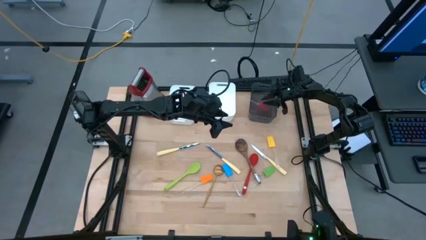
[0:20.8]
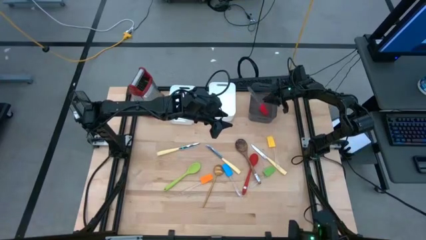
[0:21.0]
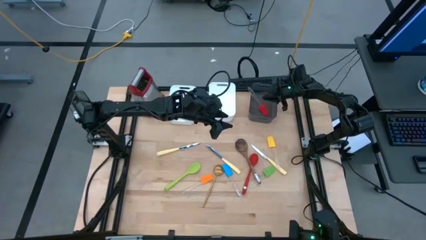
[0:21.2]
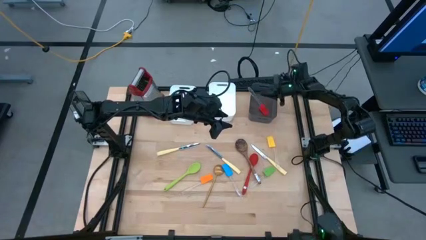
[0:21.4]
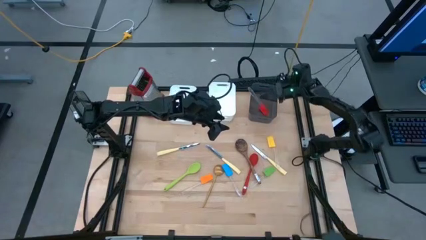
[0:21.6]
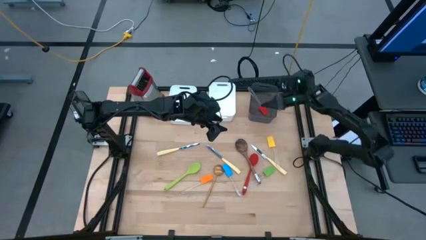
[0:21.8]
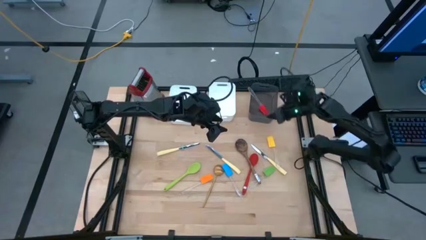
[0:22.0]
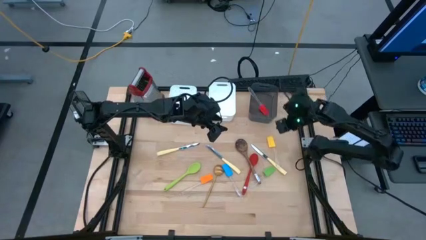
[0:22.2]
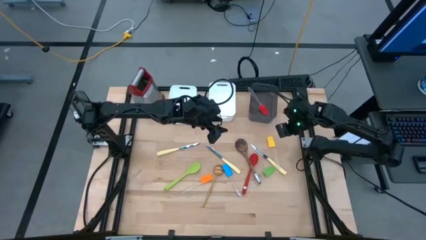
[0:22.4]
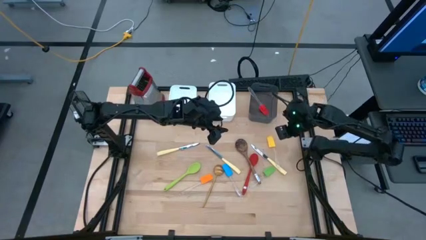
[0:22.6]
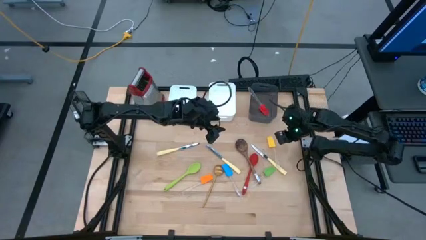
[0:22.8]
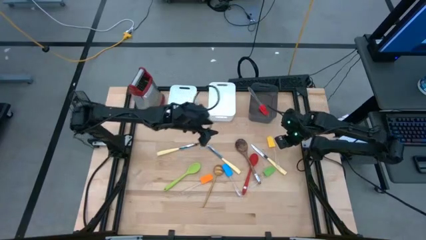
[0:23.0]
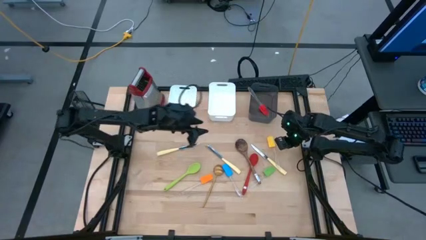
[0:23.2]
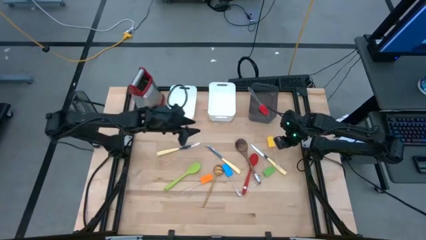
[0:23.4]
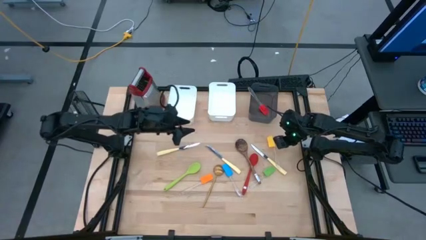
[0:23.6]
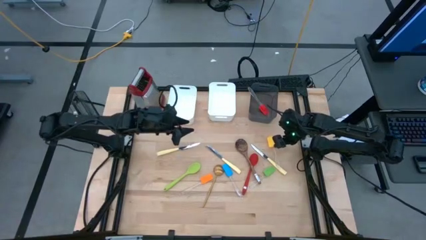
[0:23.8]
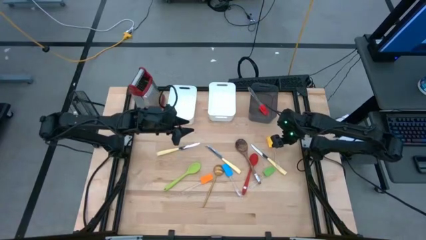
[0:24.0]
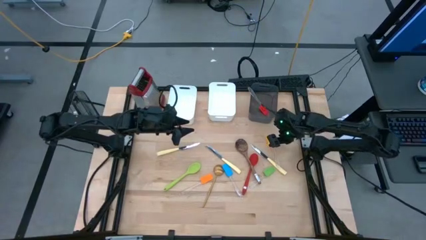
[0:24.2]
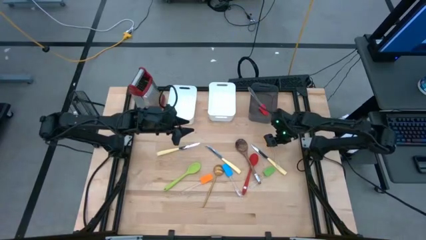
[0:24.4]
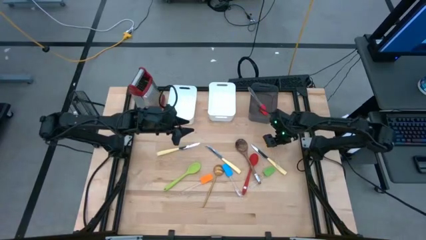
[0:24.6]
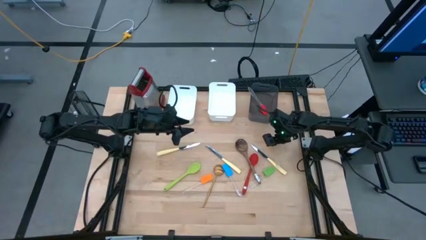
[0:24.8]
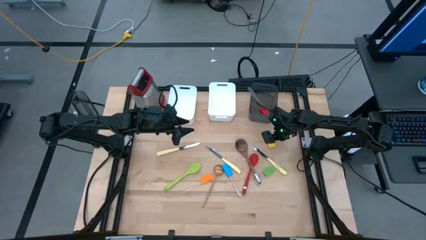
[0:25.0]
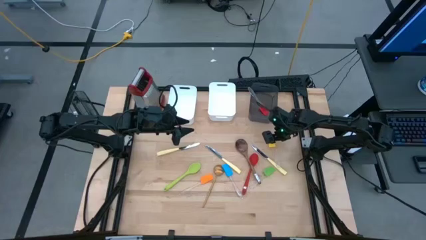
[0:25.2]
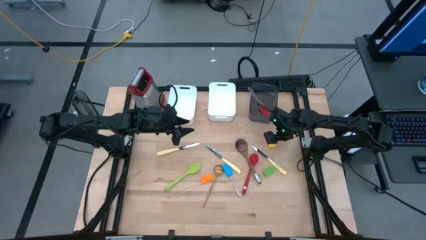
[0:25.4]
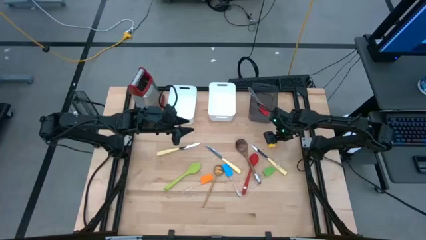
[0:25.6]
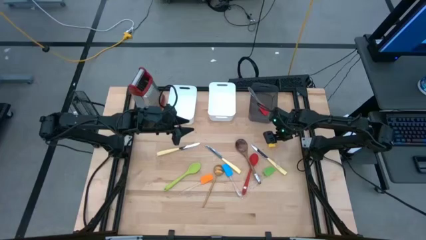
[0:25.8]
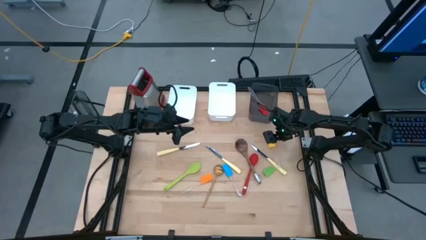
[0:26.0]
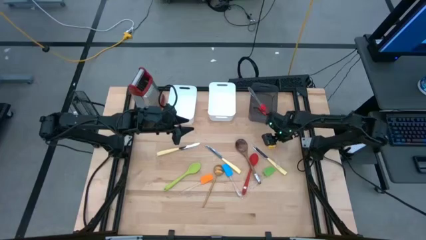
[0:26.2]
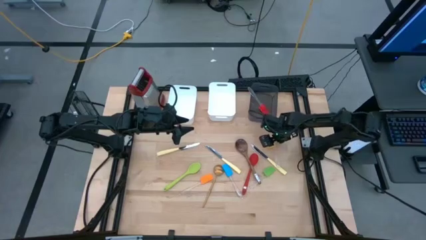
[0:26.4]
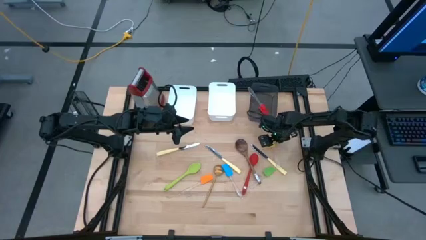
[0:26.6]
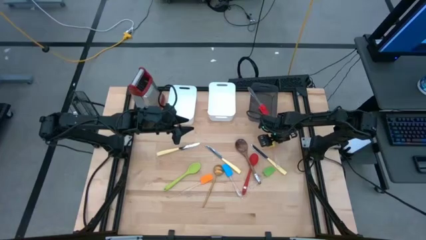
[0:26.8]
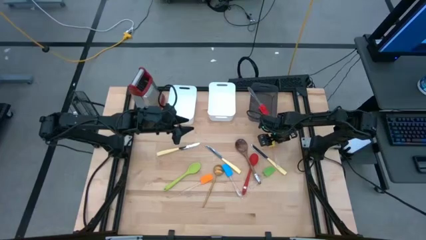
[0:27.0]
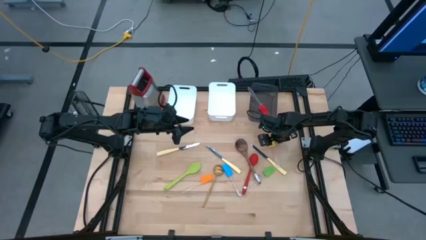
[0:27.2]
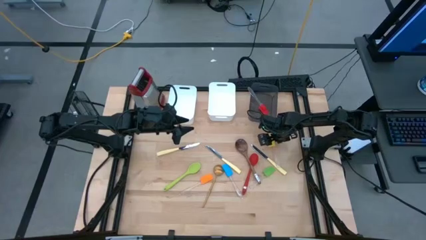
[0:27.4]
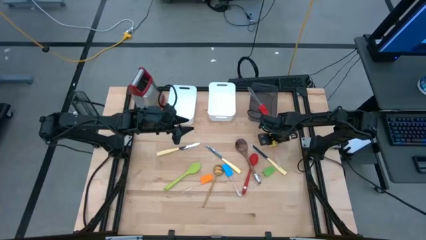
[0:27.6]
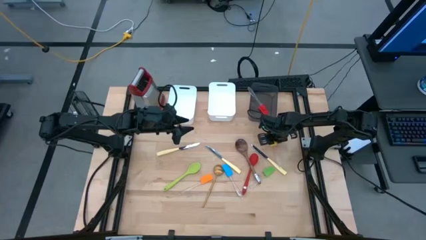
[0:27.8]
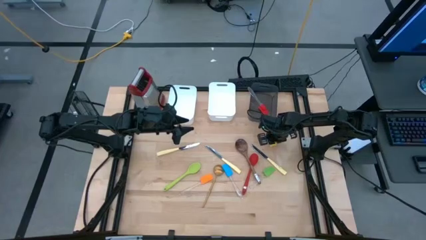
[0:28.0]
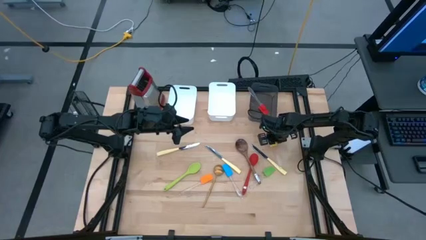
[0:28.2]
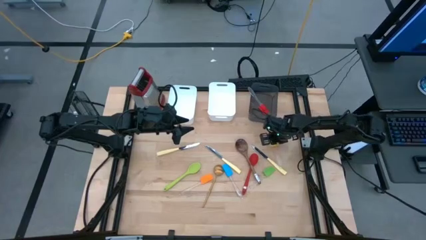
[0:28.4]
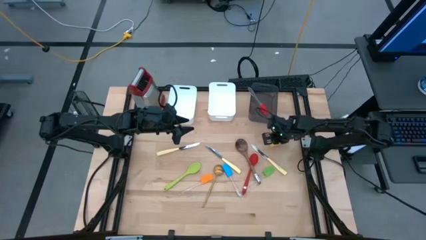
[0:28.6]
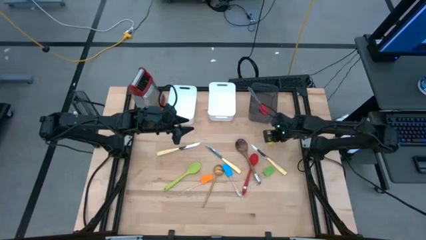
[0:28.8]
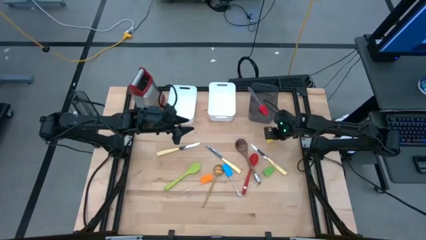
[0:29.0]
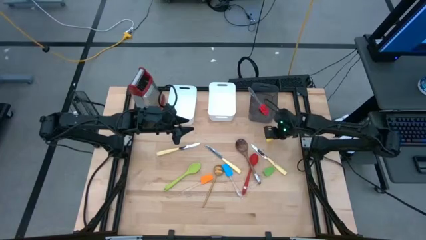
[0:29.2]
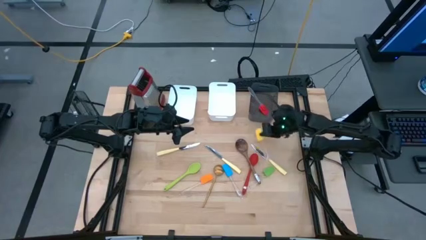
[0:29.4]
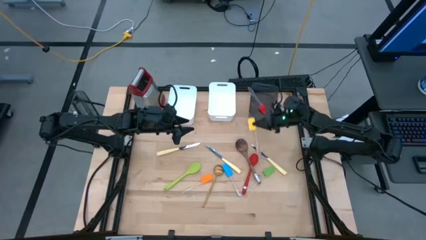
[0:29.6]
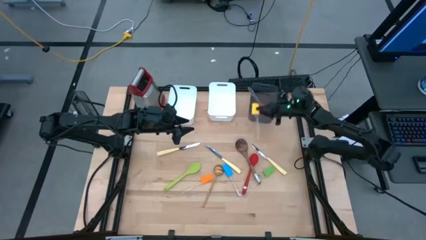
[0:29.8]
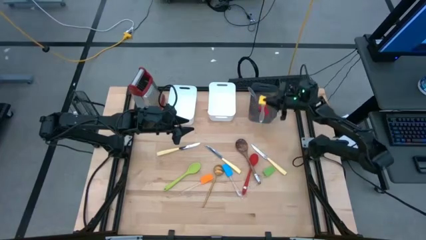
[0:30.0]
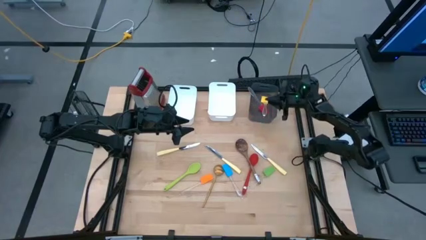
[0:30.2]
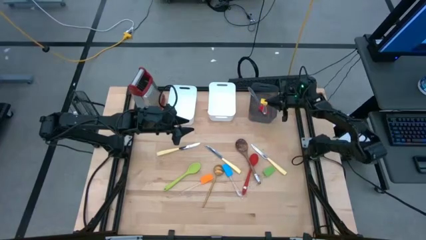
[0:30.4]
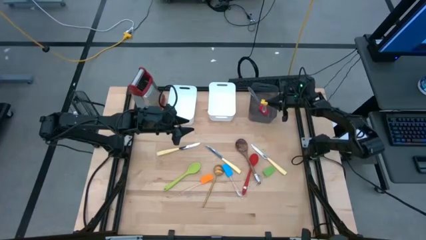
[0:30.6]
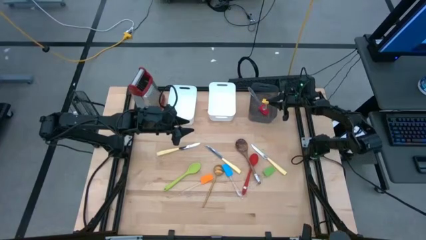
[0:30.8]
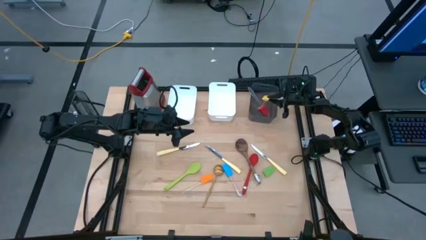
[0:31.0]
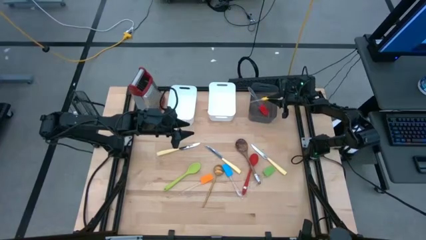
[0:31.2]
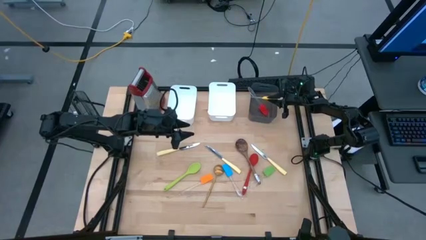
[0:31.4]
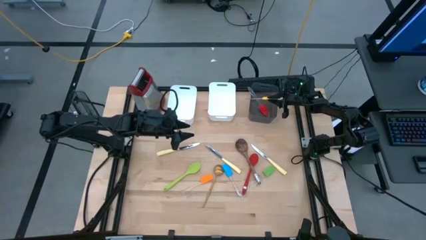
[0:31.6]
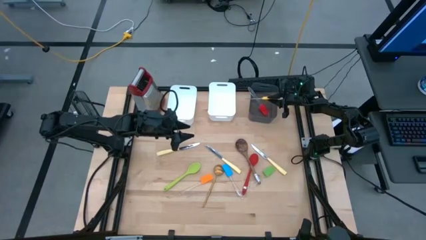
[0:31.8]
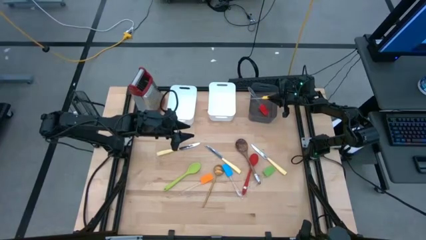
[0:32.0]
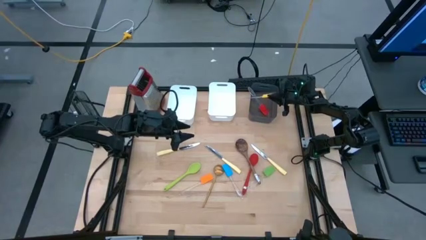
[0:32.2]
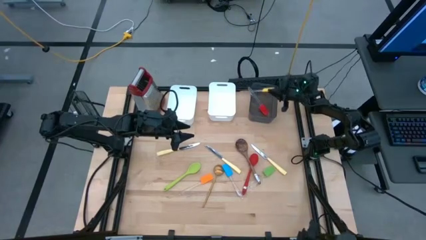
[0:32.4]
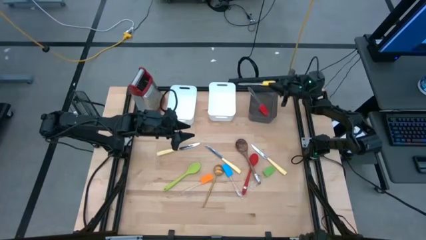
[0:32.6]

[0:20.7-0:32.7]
Task: Pick & Place Kitchen Items
Put the yellow spatula into the black bin
